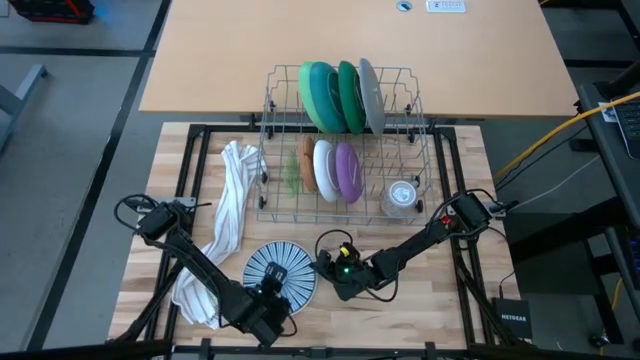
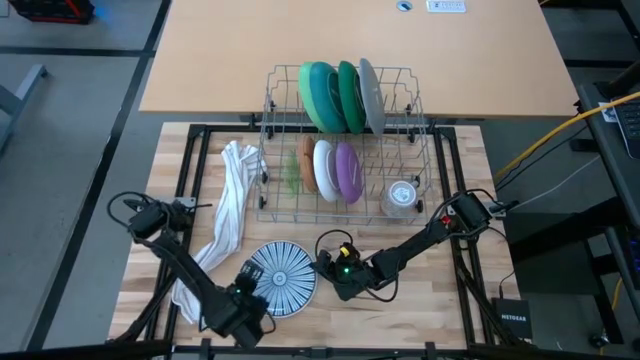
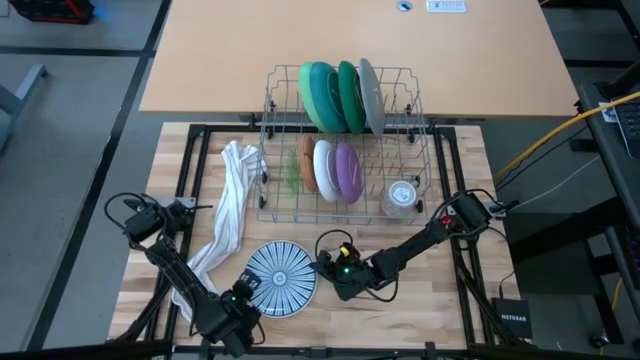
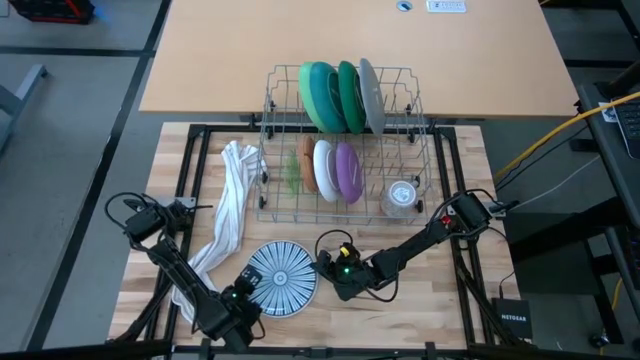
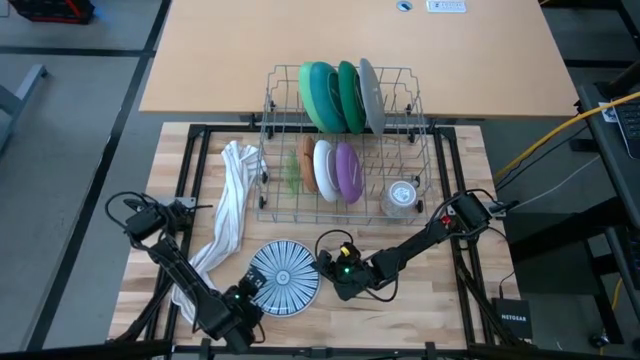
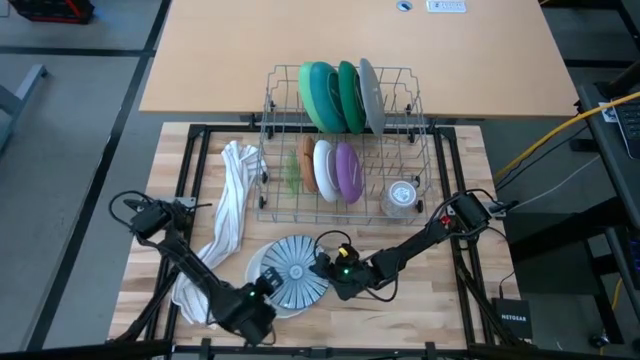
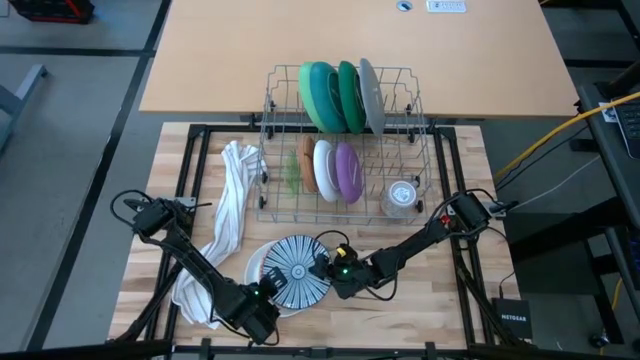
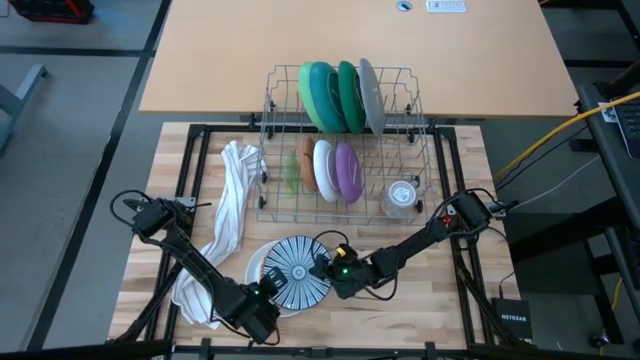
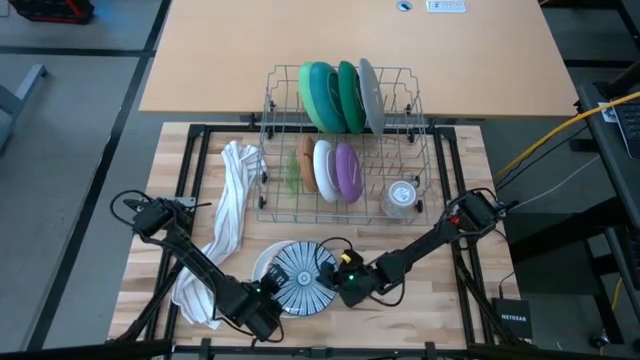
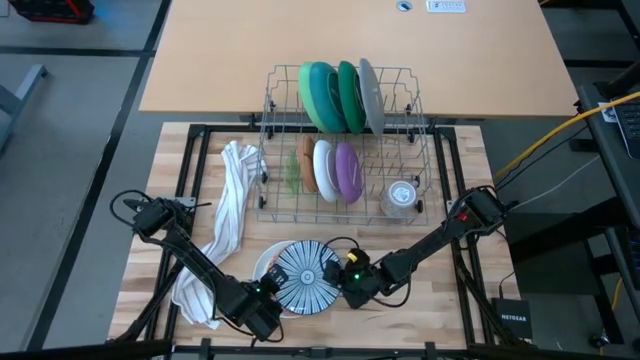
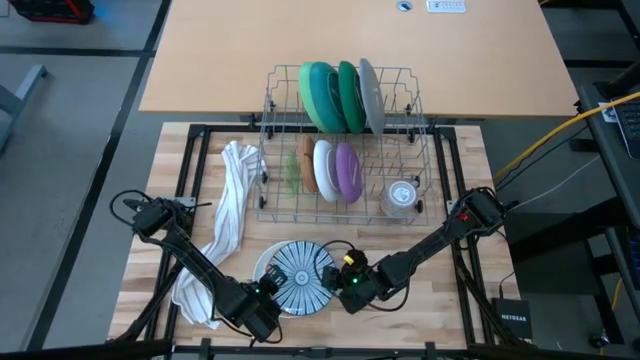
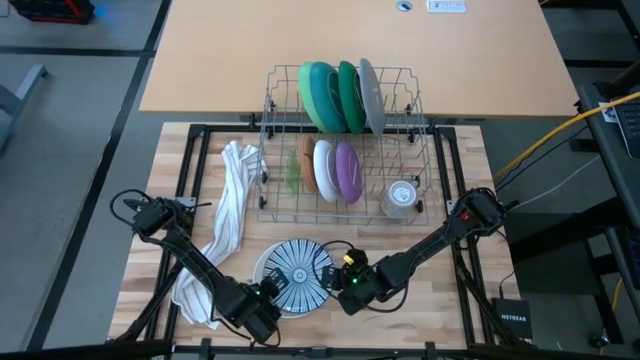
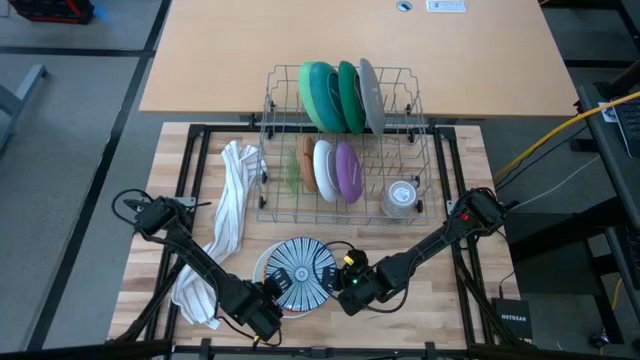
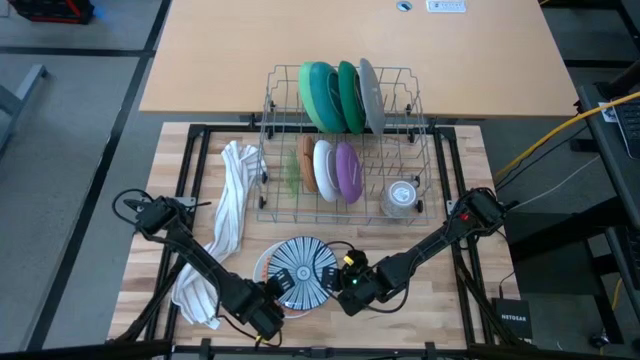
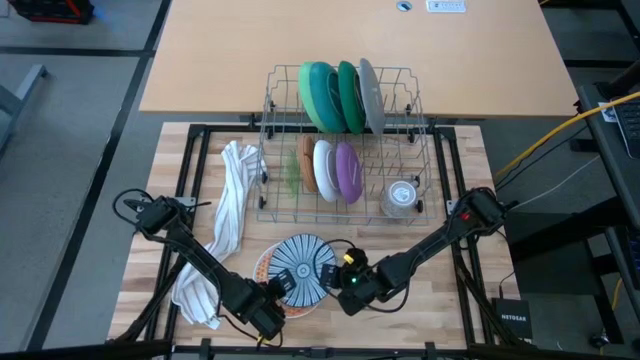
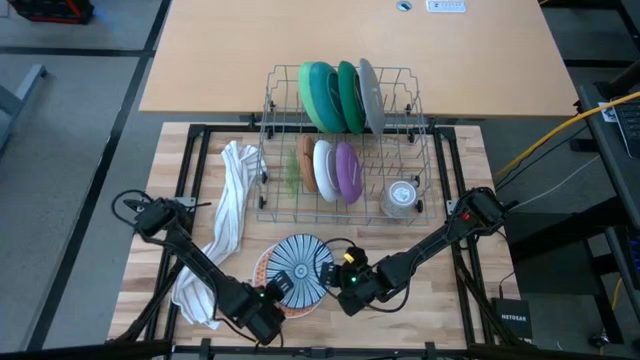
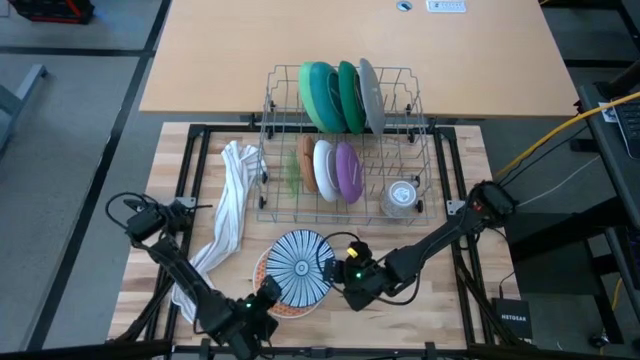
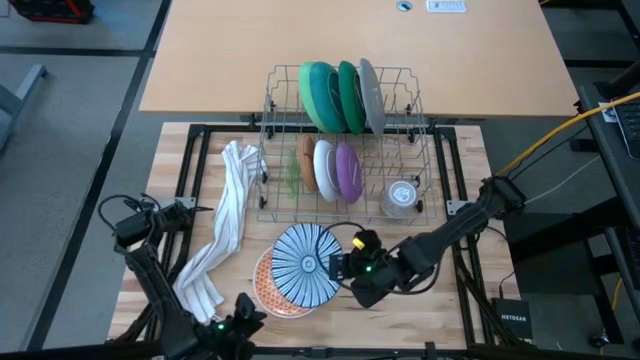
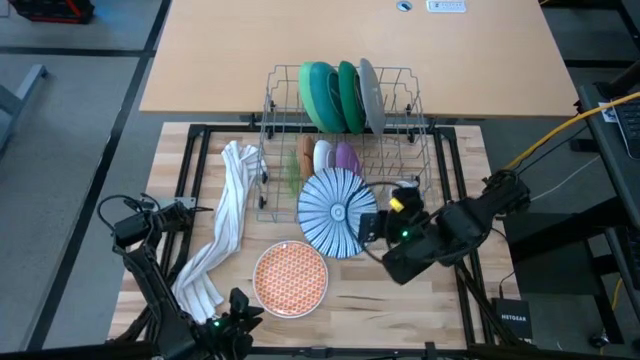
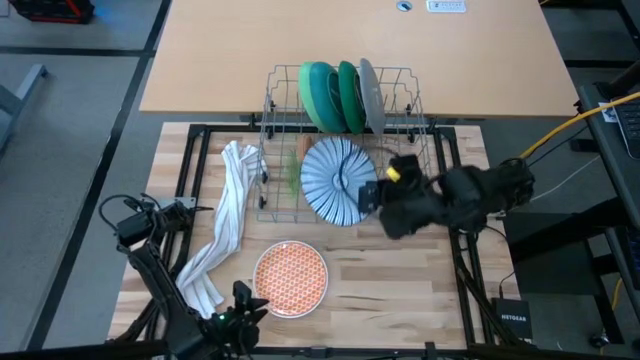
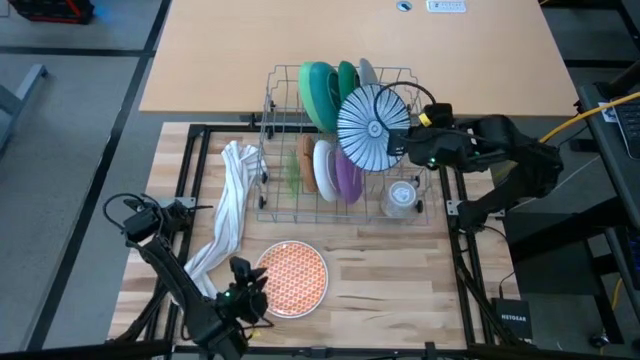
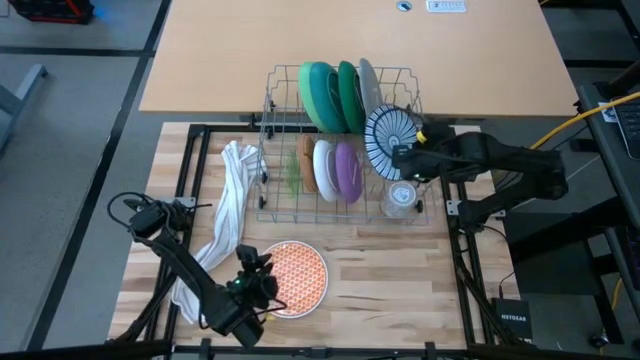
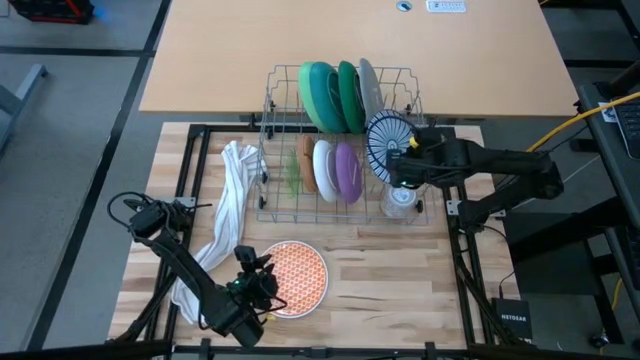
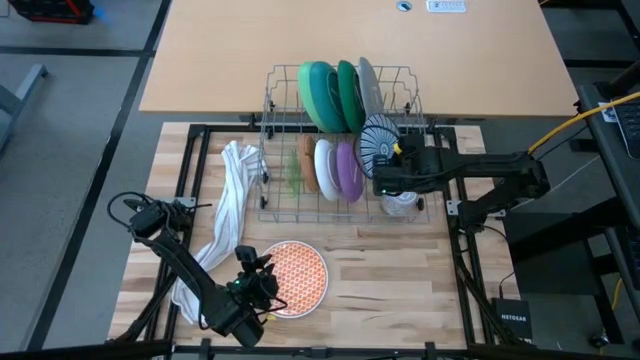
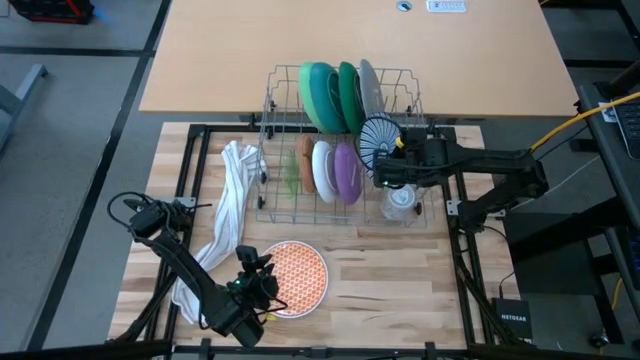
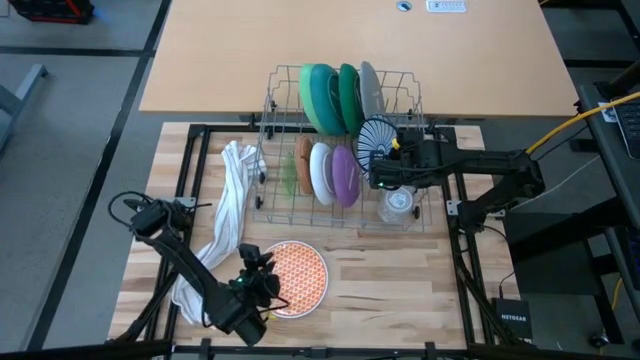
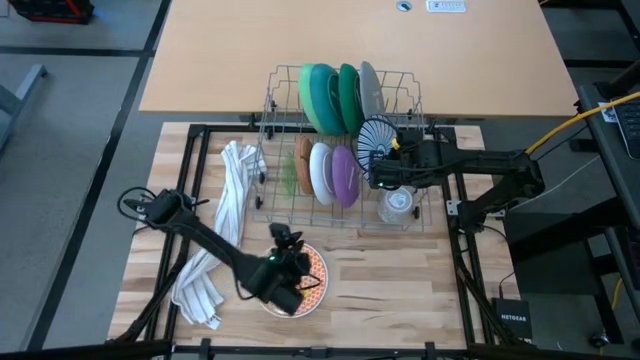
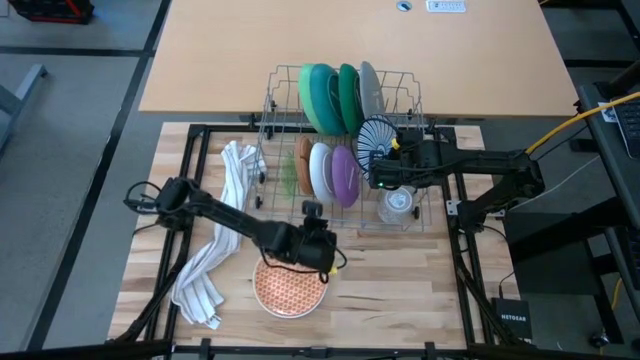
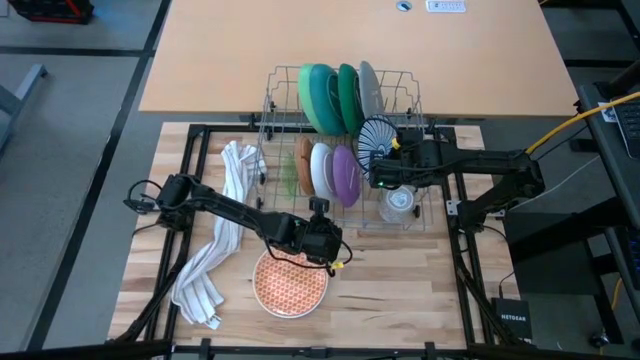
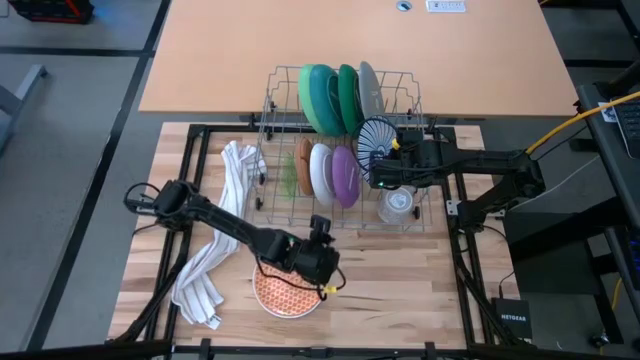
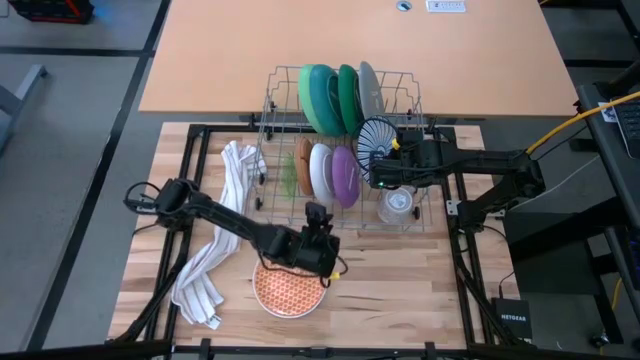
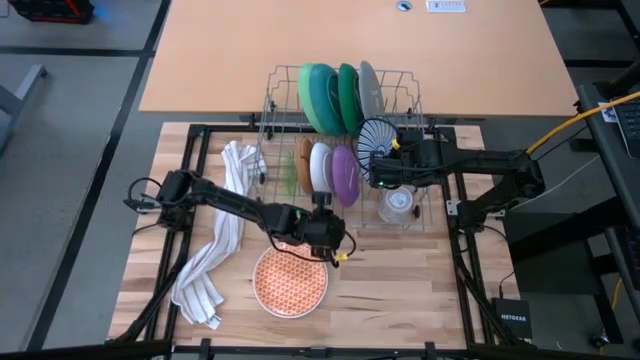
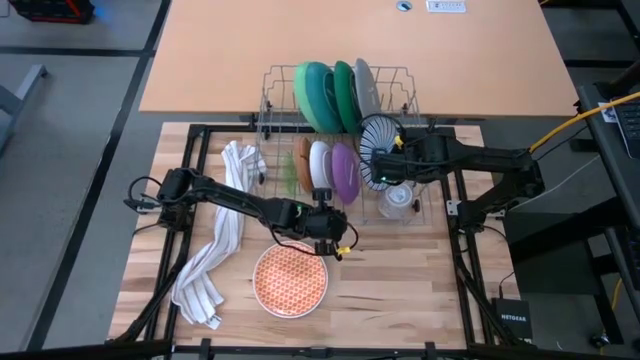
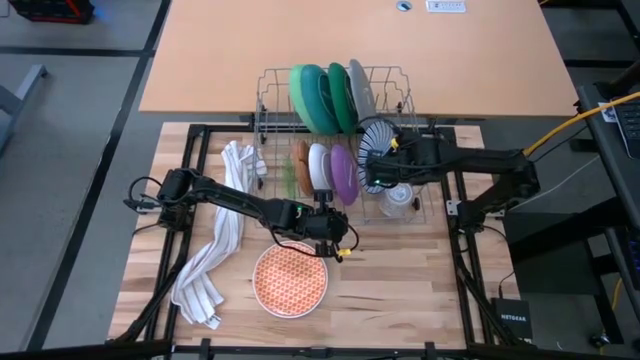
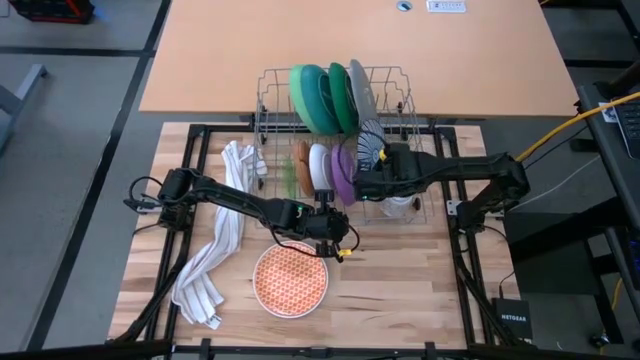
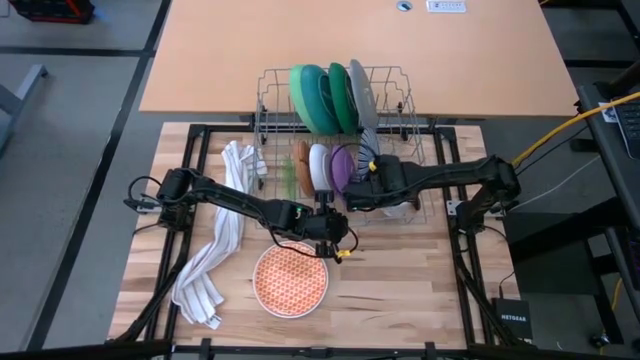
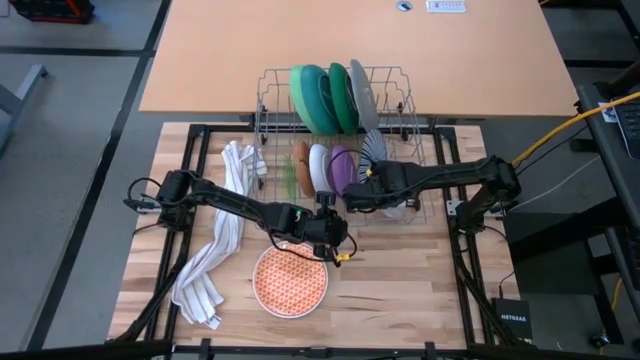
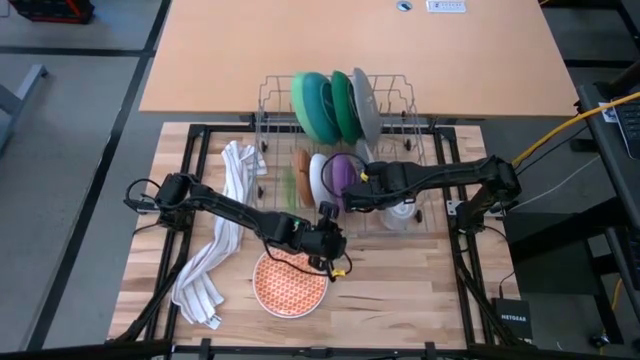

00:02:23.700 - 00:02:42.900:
Task: Sort dishes
Put the blue patterned plate into the dish rack

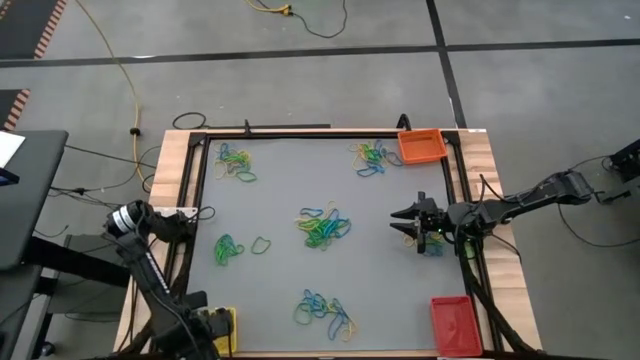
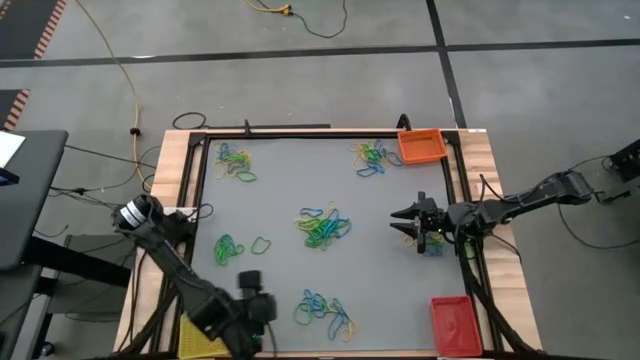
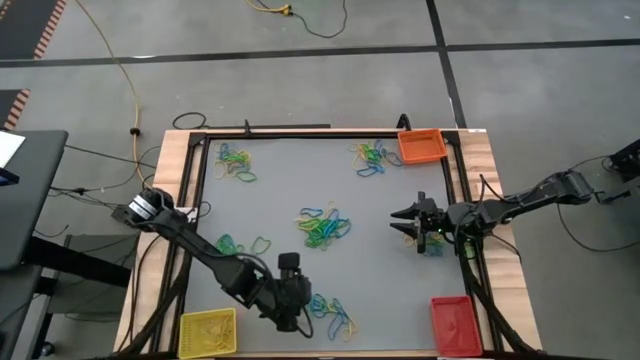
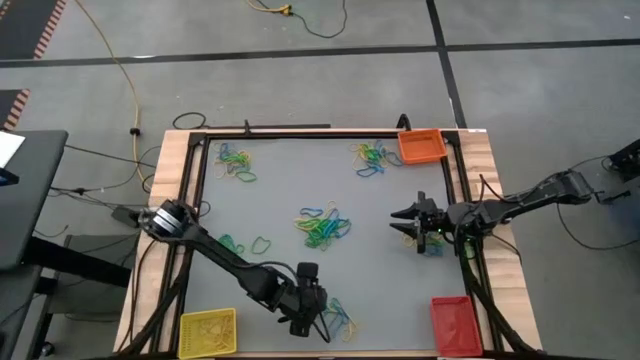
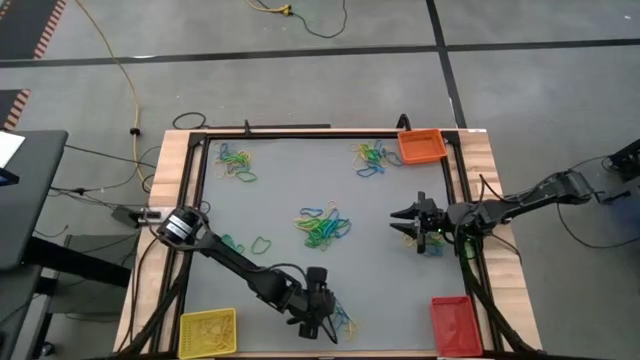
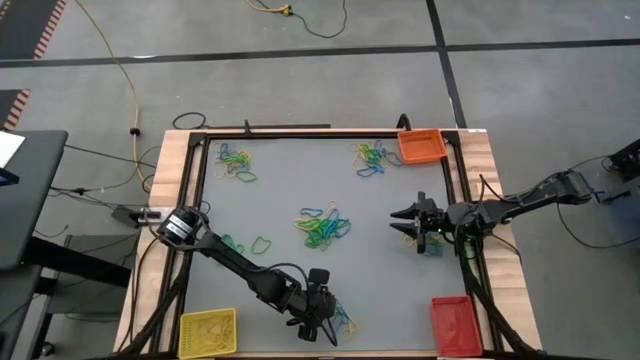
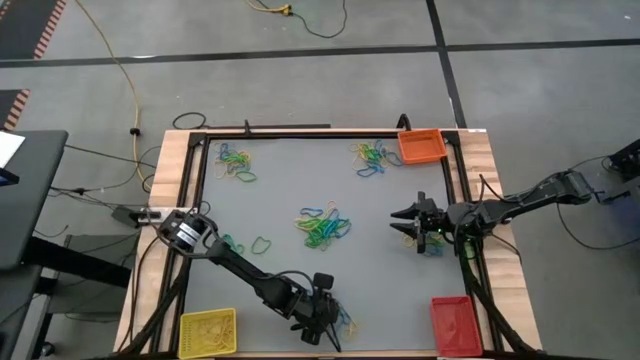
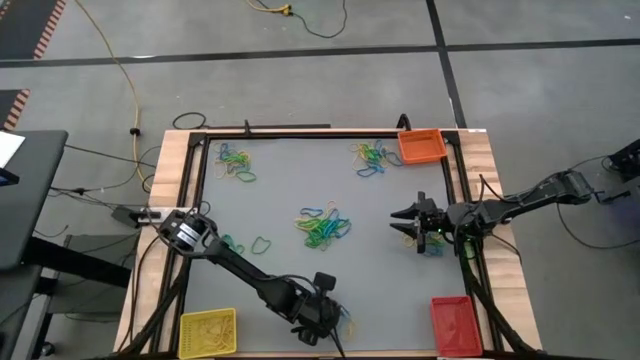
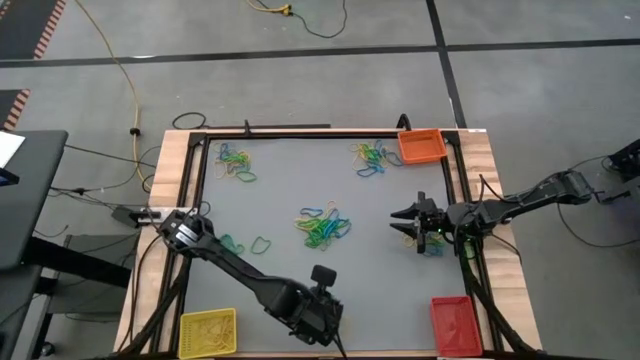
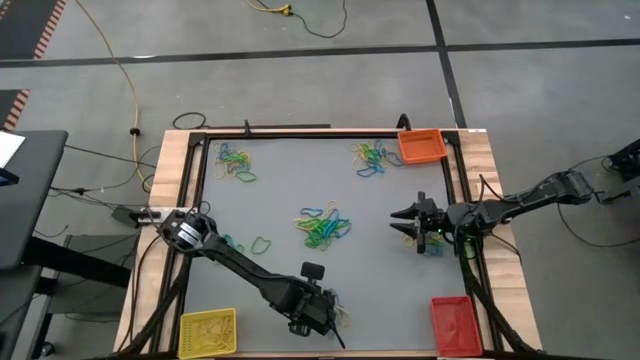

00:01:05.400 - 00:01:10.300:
Task: Sort rubber bands into baskets
Put the yellow rubber band into the yellow bin
